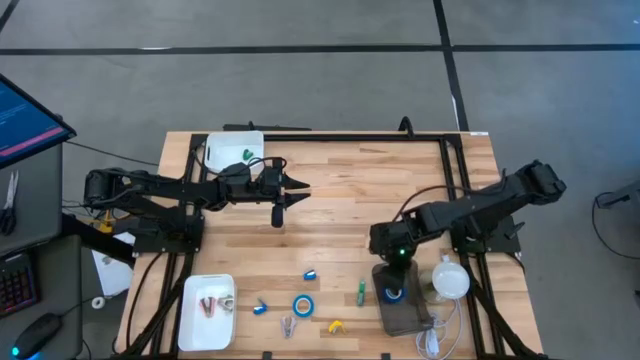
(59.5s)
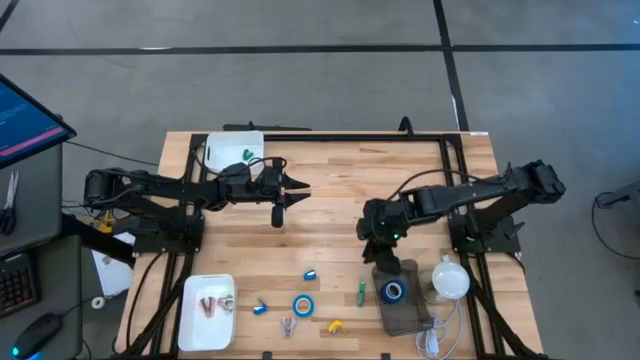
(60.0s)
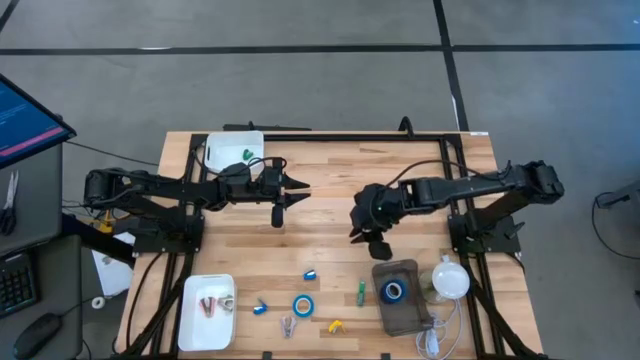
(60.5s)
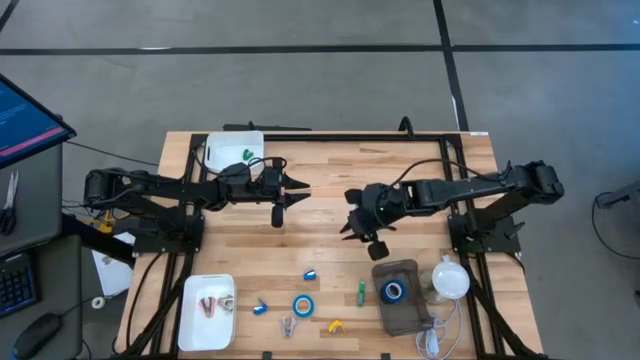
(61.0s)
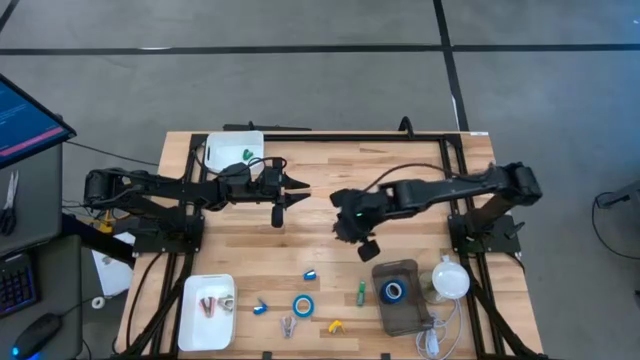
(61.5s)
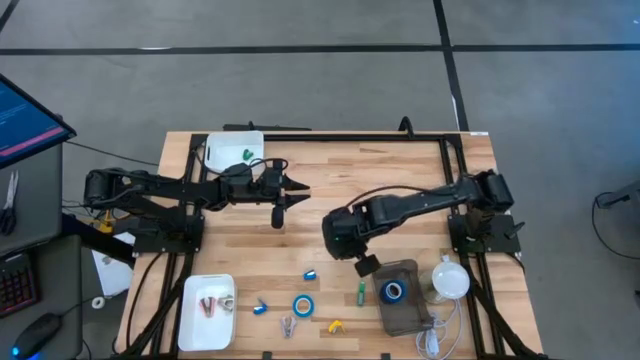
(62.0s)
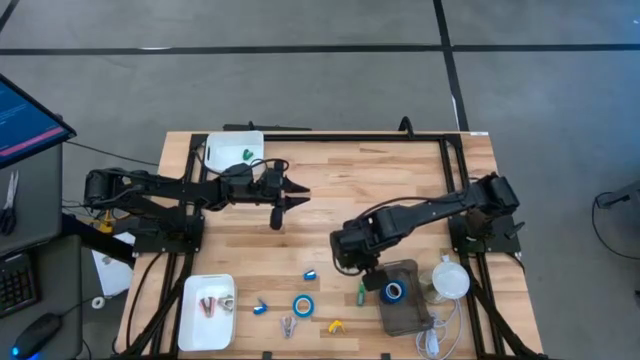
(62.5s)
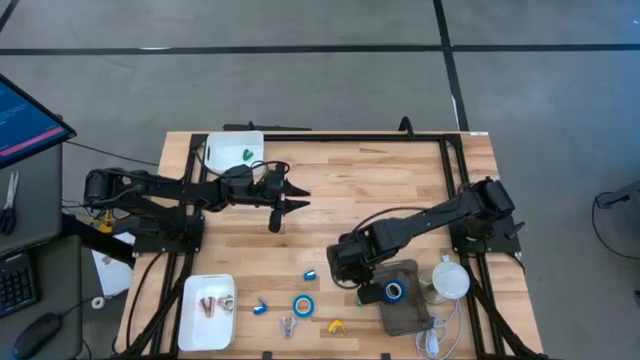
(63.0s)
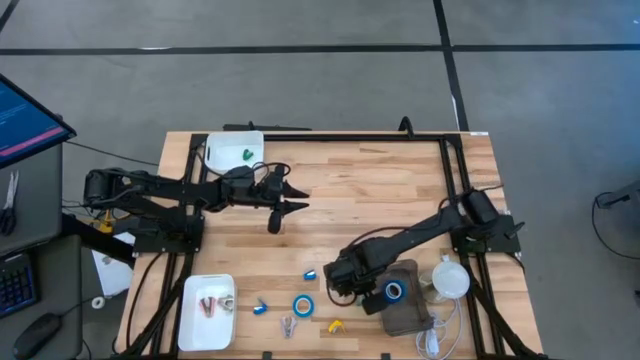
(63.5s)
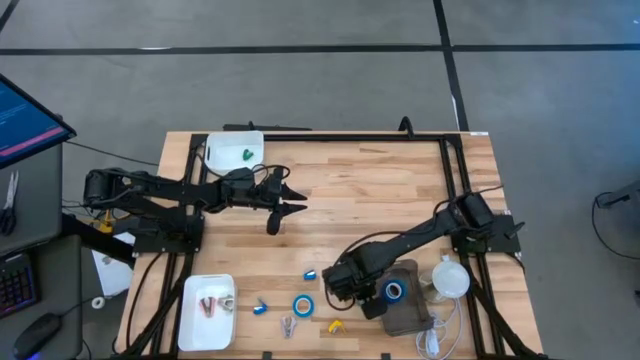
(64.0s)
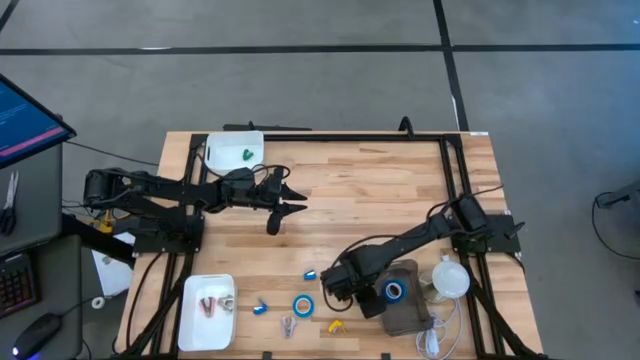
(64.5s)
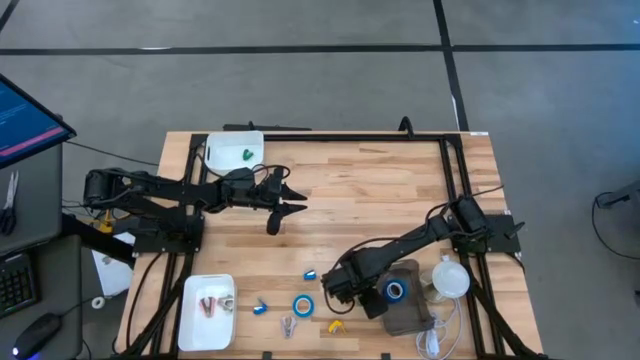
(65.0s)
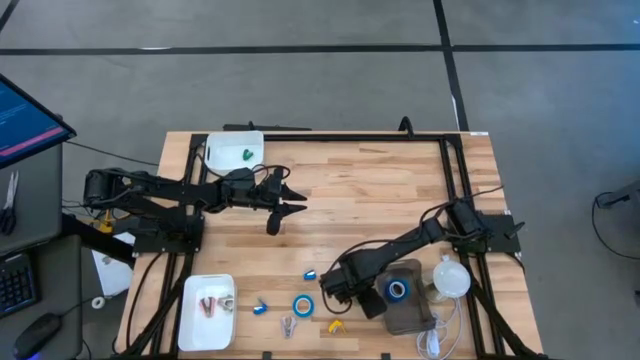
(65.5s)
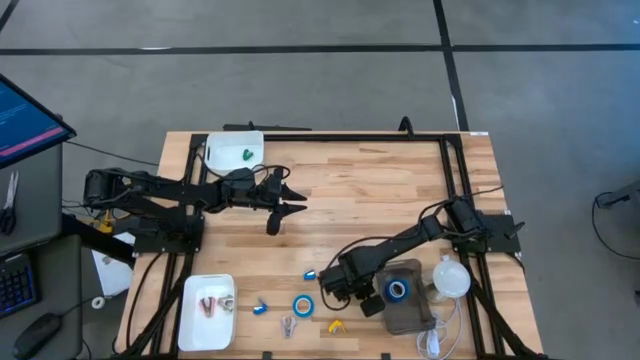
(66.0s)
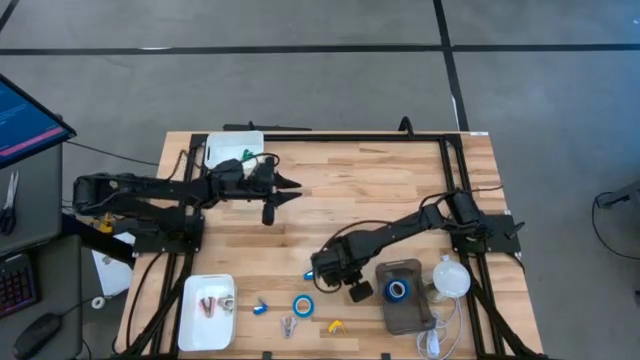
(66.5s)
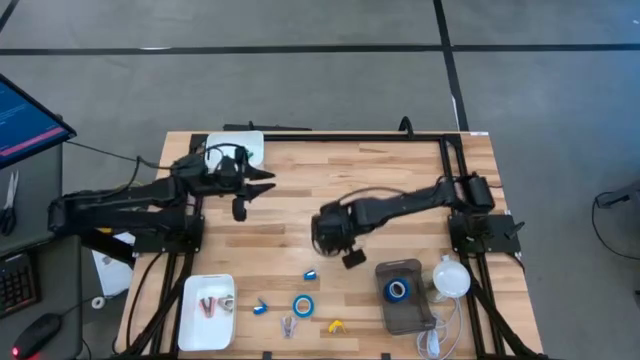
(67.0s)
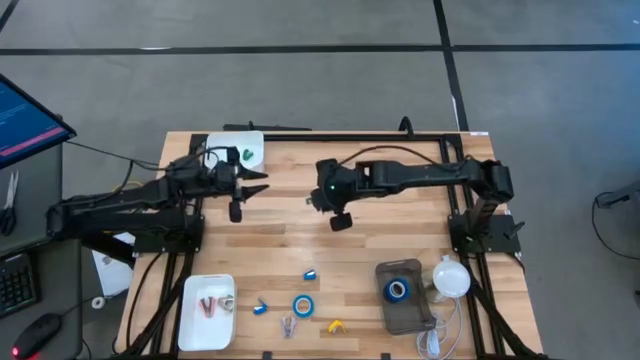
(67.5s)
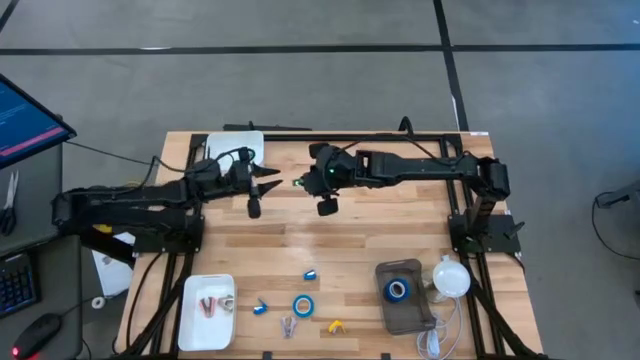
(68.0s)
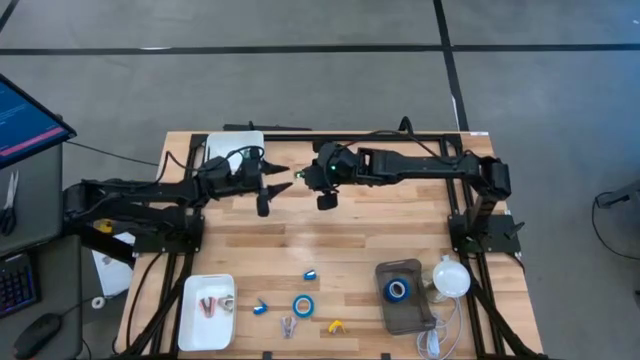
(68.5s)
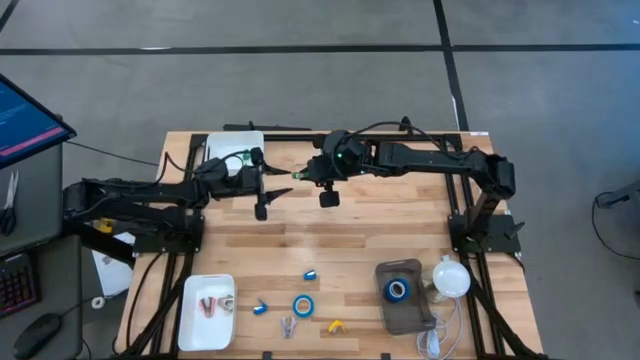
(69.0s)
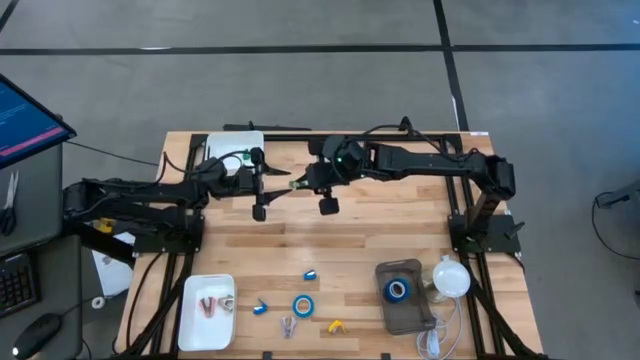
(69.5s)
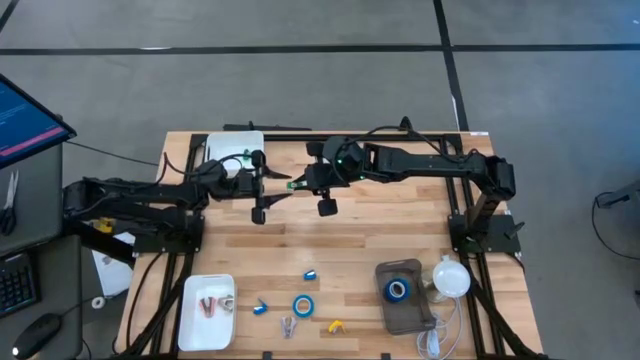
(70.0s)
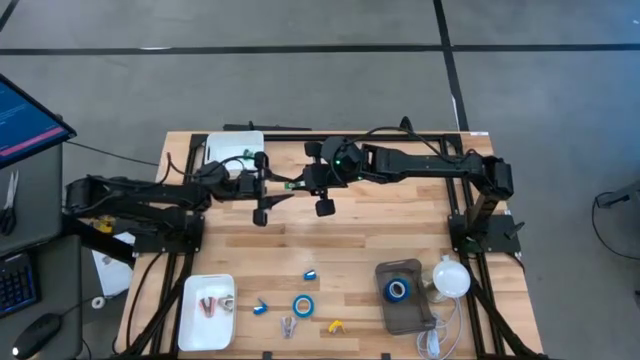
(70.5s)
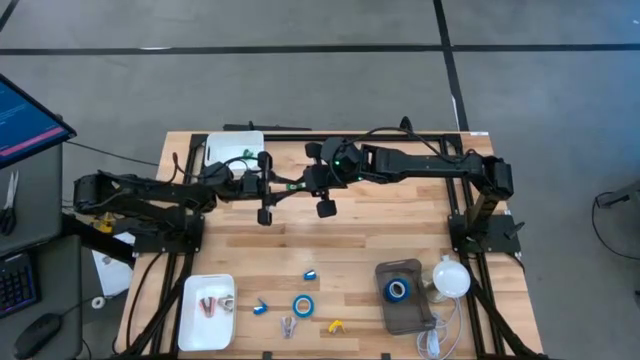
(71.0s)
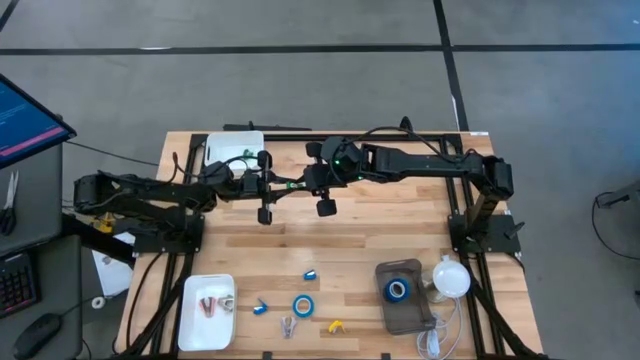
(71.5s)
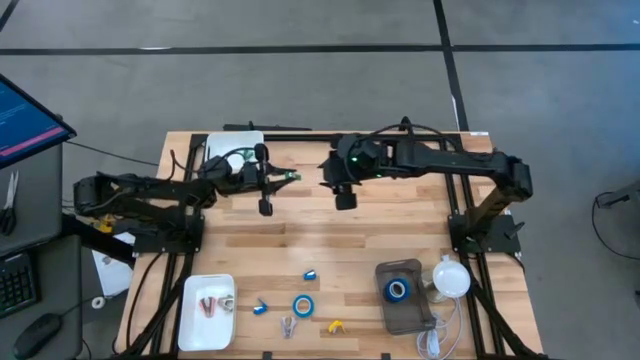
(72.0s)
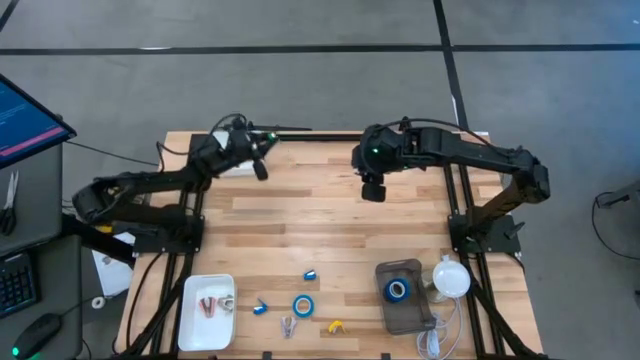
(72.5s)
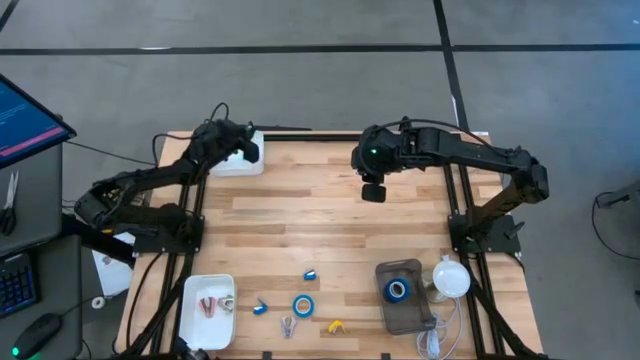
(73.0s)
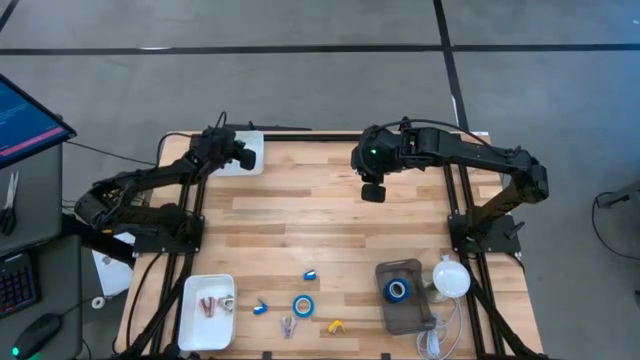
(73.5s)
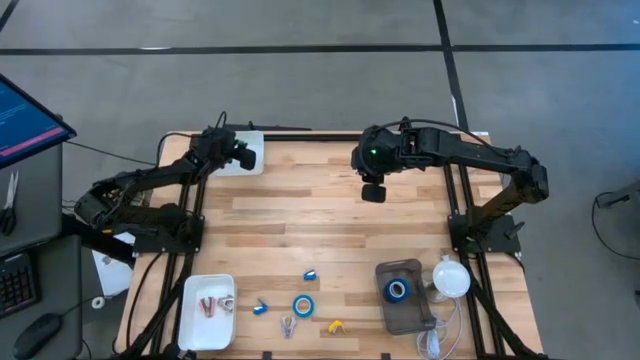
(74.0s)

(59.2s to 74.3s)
Task: Pick and place Stapler, Stapler remover, tape
Put the green stapler into the top white bin

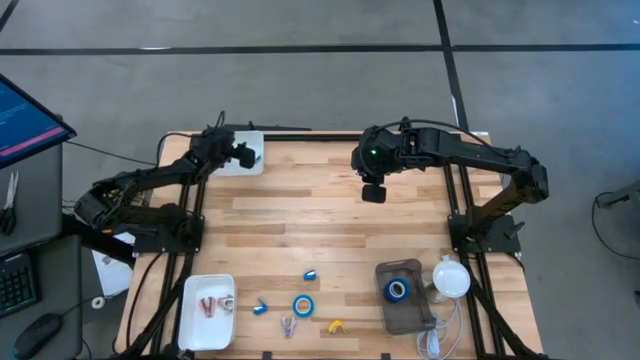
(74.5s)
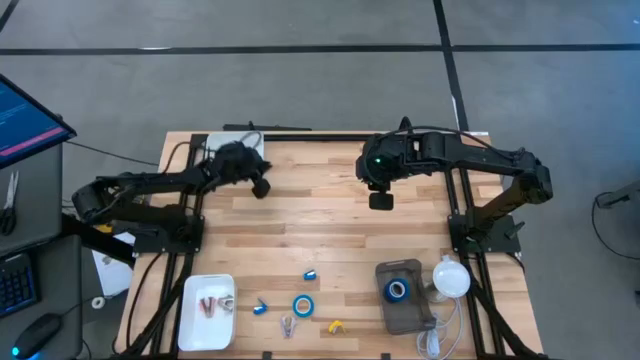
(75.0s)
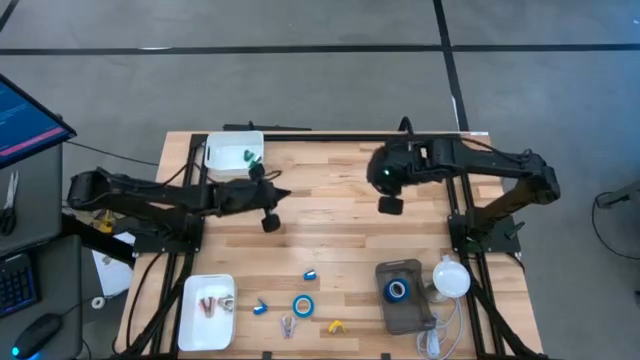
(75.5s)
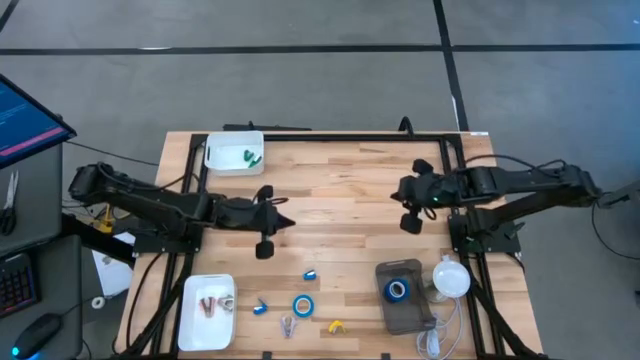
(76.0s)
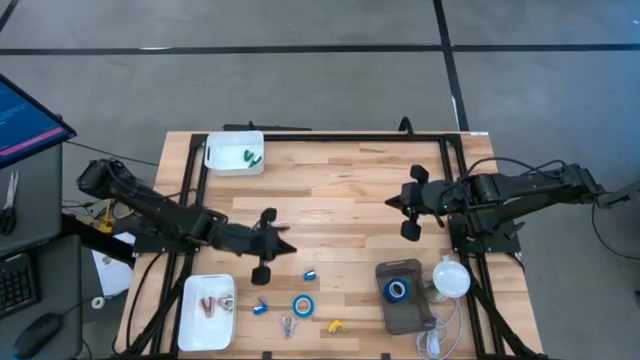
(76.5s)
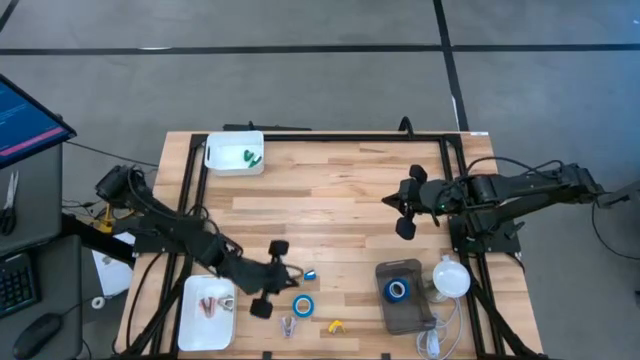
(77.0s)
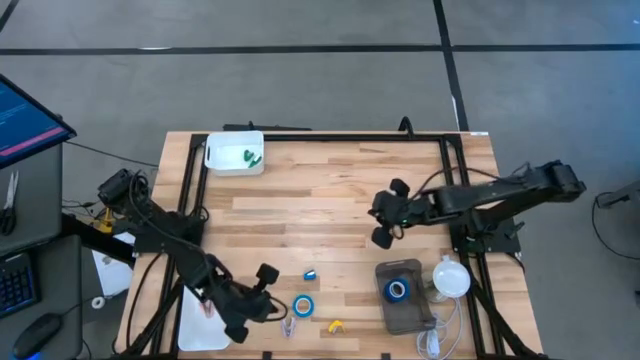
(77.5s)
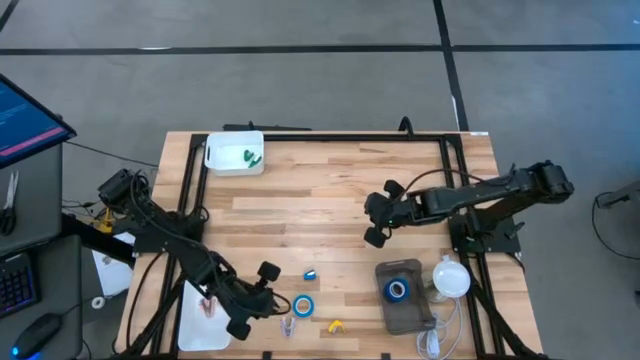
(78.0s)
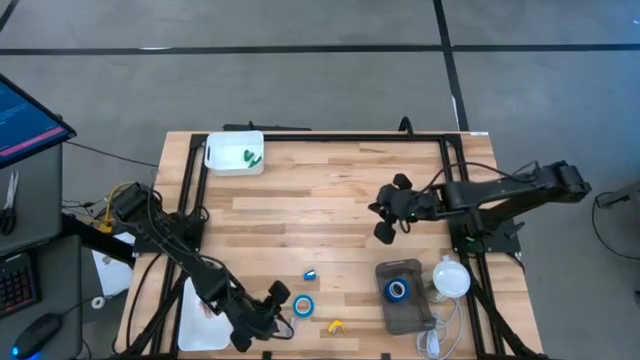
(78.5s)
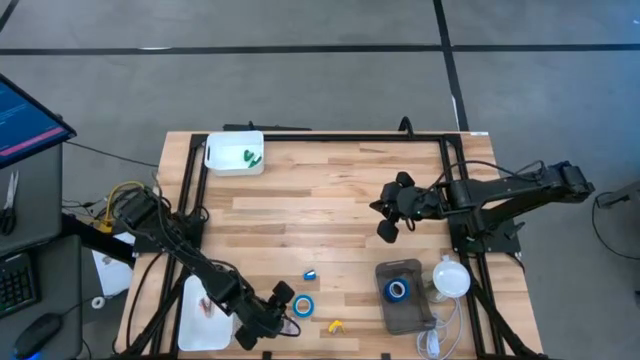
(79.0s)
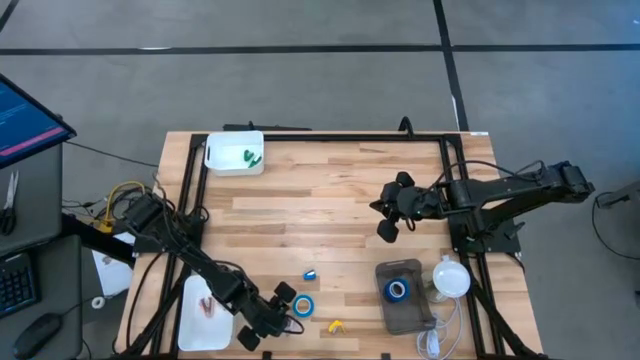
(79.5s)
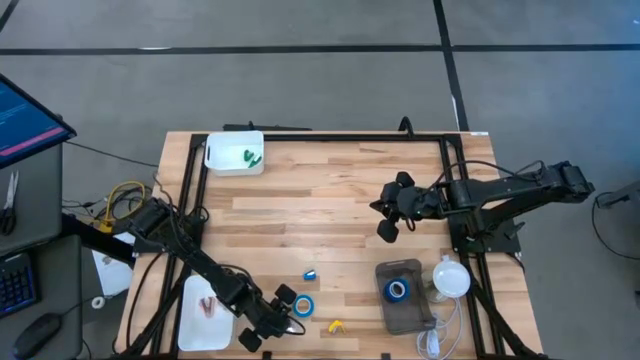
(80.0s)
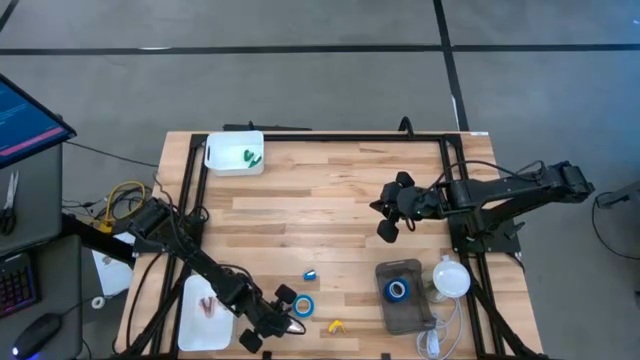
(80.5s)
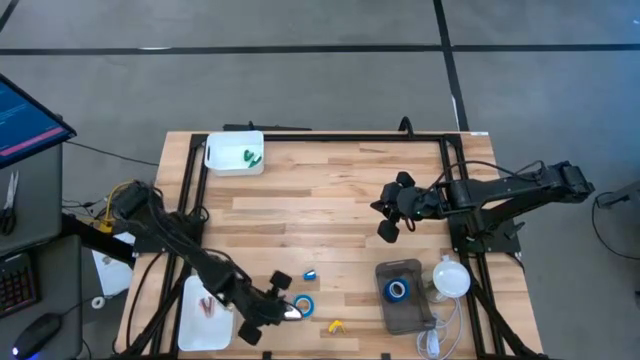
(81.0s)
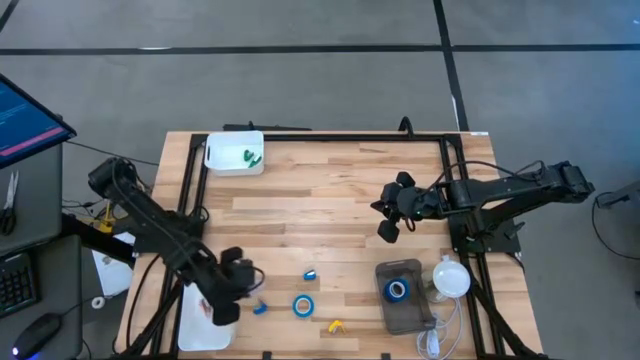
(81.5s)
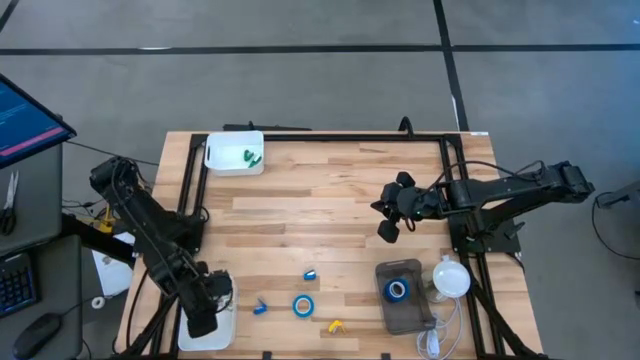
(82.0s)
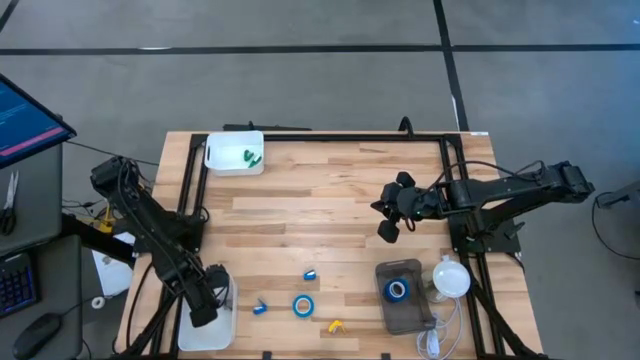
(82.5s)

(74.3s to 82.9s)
Put the violet staple remover into the bottom white bin
